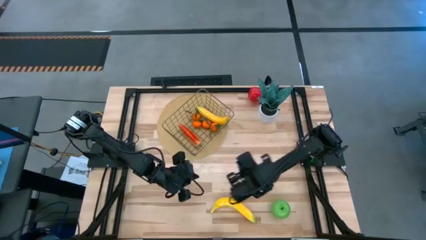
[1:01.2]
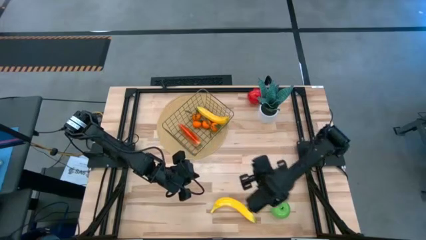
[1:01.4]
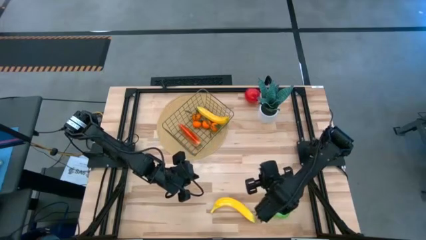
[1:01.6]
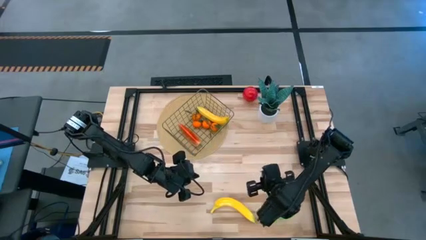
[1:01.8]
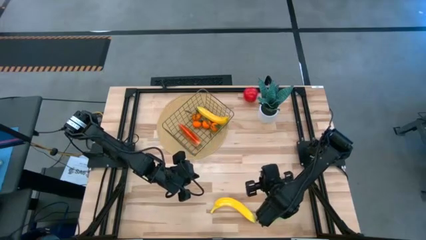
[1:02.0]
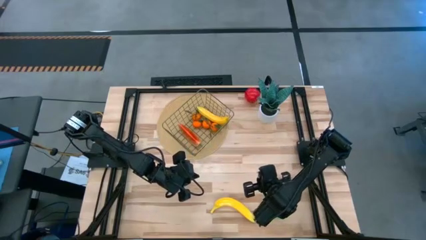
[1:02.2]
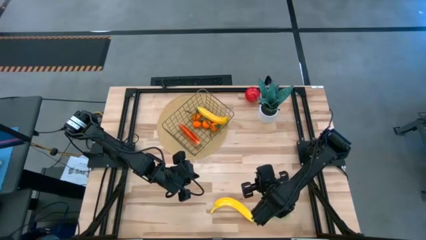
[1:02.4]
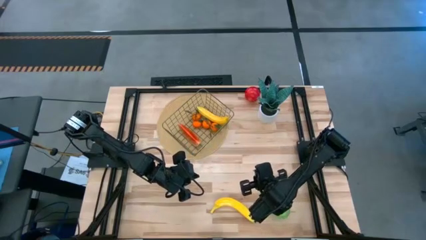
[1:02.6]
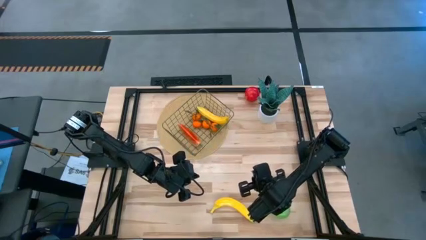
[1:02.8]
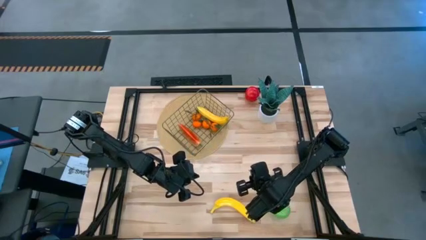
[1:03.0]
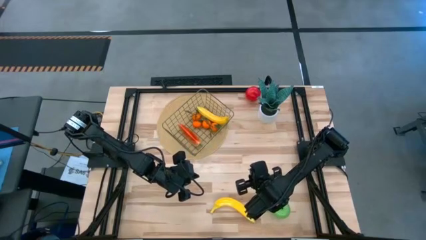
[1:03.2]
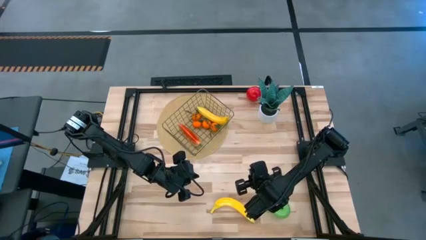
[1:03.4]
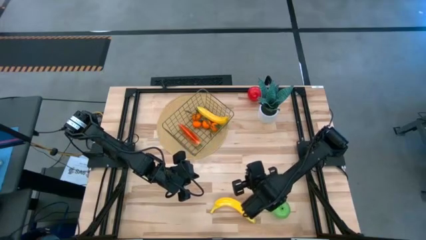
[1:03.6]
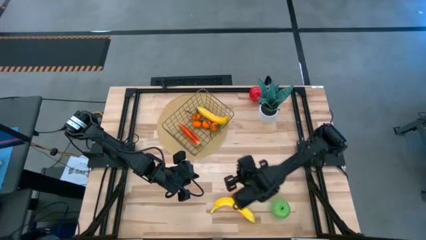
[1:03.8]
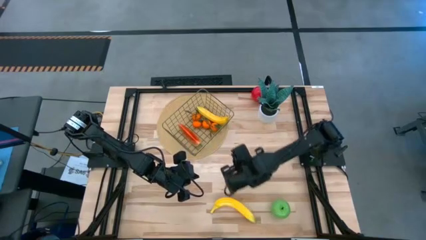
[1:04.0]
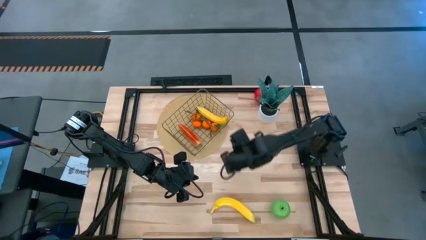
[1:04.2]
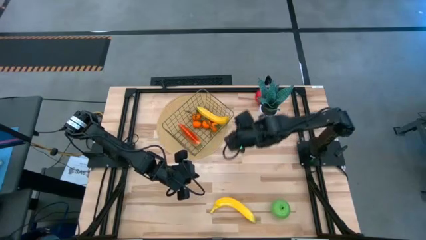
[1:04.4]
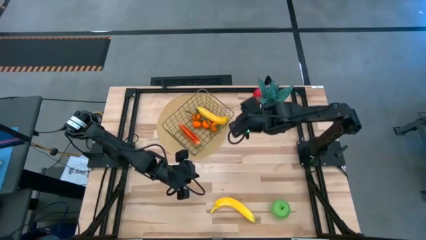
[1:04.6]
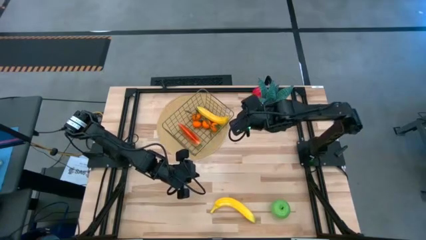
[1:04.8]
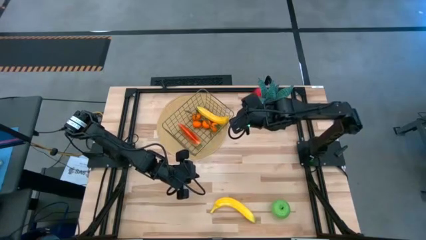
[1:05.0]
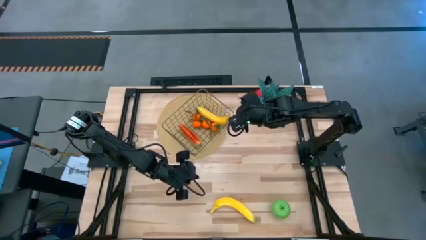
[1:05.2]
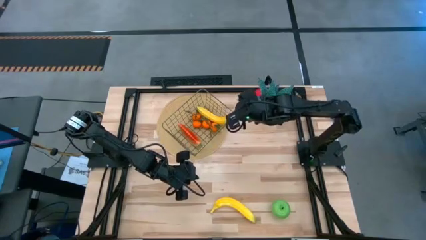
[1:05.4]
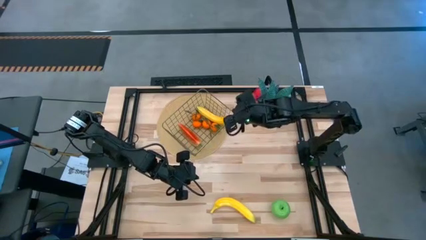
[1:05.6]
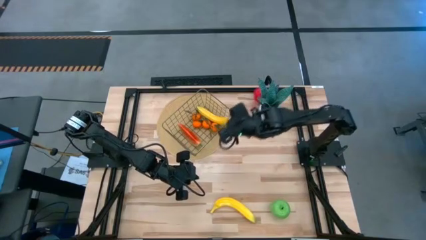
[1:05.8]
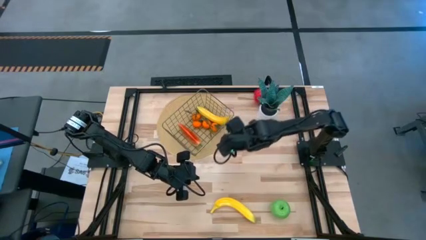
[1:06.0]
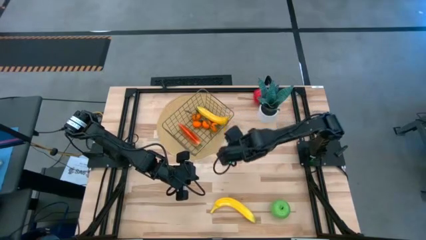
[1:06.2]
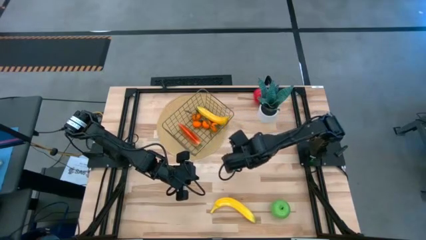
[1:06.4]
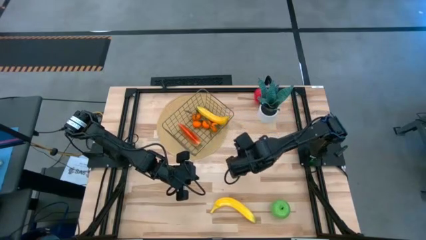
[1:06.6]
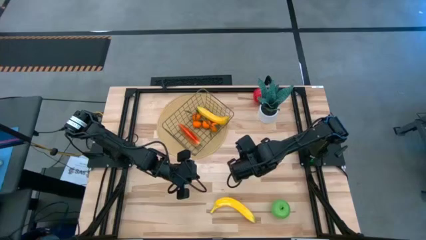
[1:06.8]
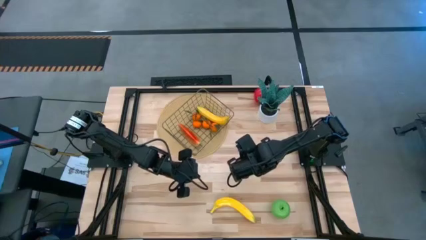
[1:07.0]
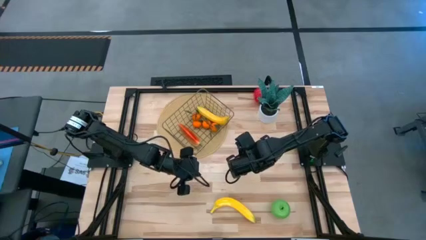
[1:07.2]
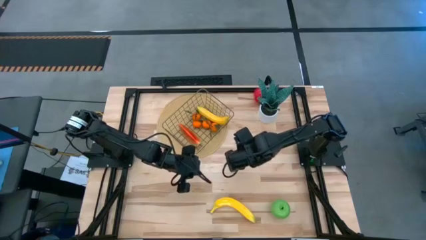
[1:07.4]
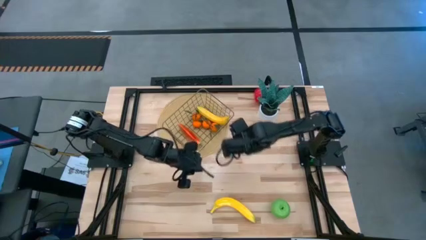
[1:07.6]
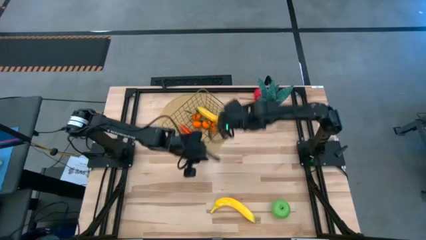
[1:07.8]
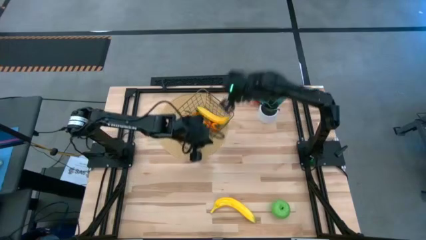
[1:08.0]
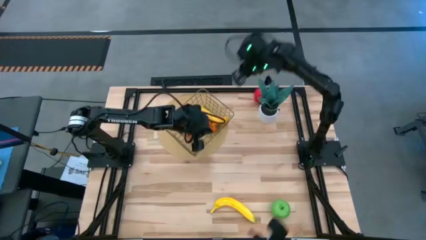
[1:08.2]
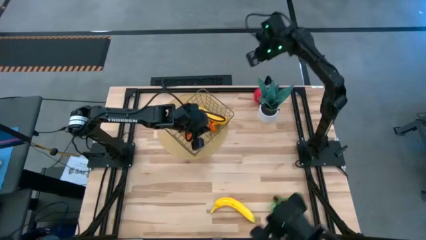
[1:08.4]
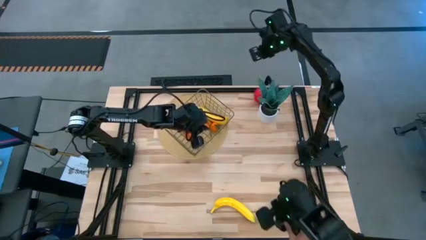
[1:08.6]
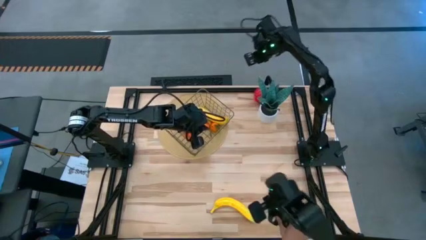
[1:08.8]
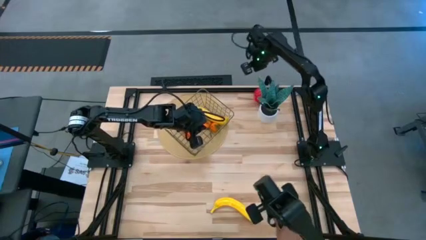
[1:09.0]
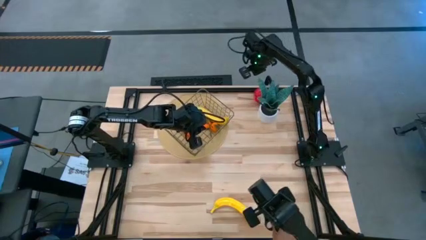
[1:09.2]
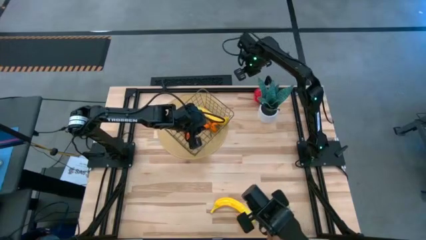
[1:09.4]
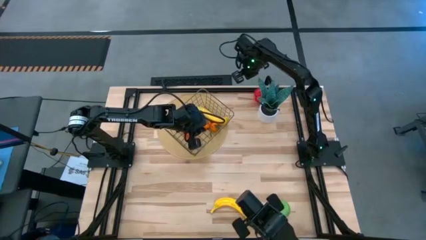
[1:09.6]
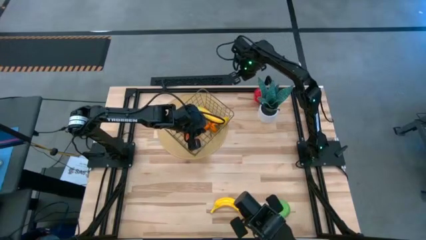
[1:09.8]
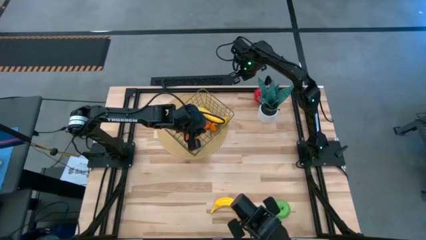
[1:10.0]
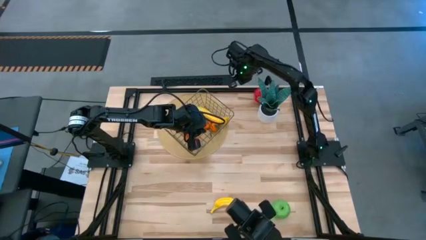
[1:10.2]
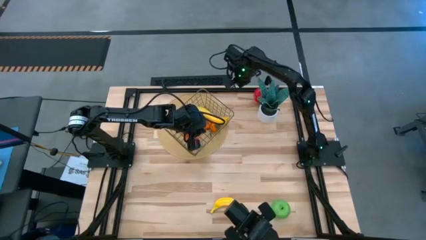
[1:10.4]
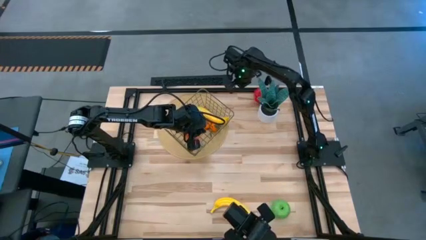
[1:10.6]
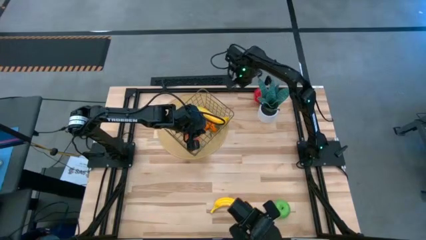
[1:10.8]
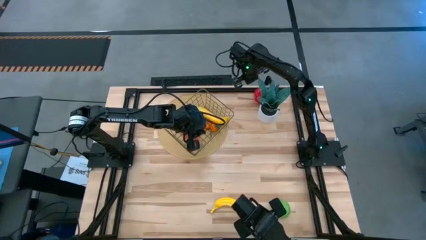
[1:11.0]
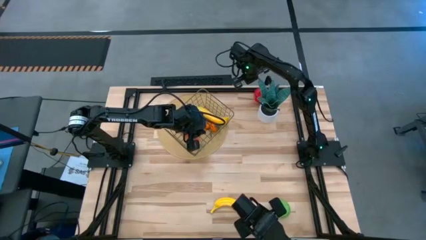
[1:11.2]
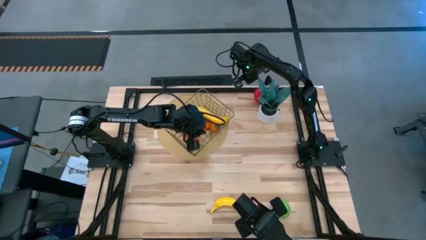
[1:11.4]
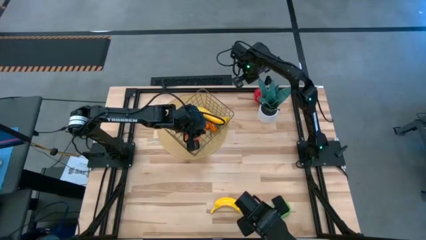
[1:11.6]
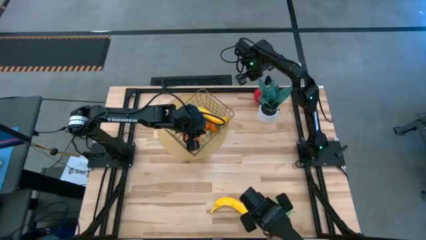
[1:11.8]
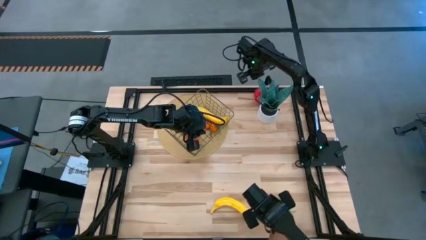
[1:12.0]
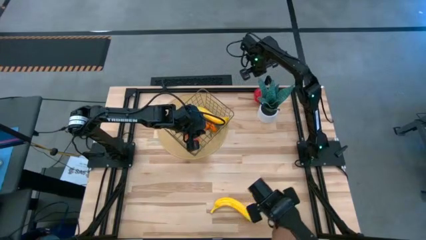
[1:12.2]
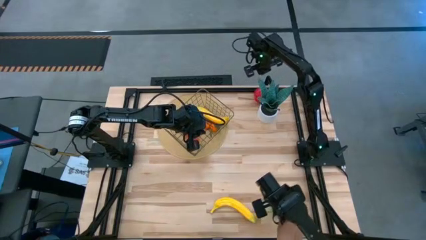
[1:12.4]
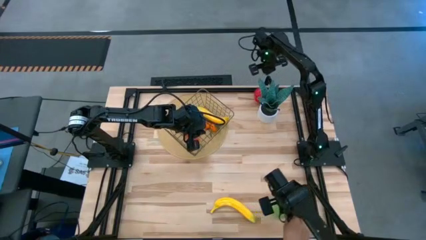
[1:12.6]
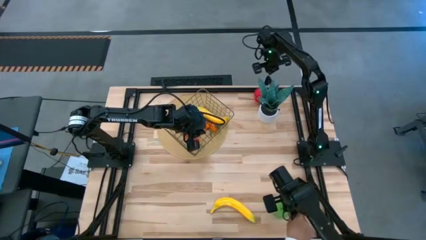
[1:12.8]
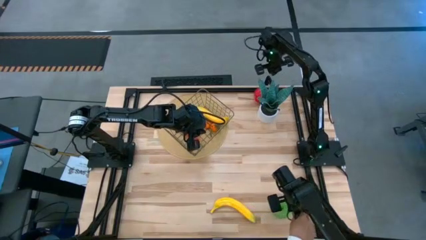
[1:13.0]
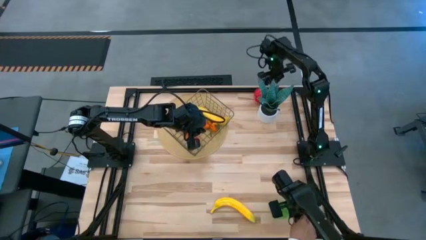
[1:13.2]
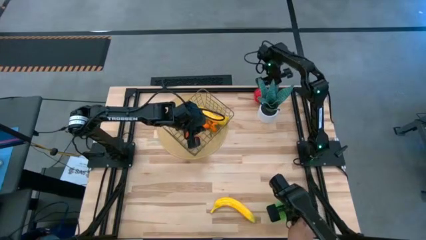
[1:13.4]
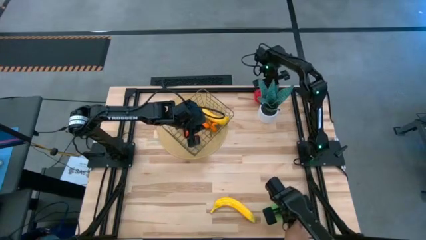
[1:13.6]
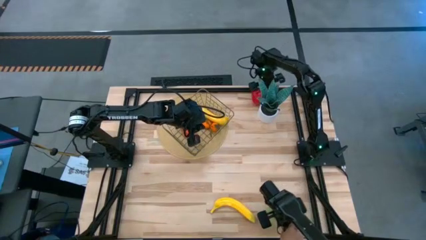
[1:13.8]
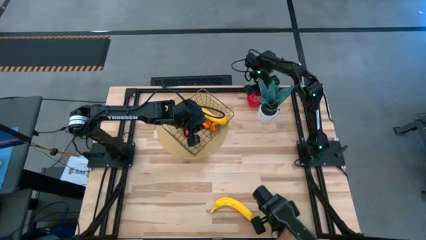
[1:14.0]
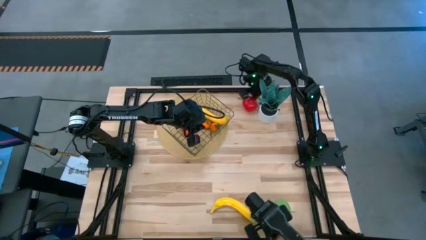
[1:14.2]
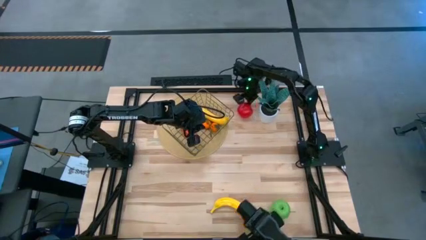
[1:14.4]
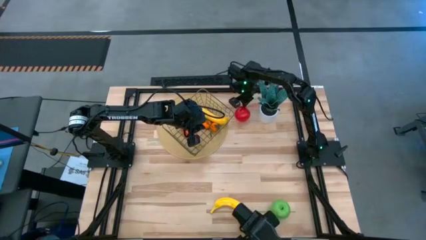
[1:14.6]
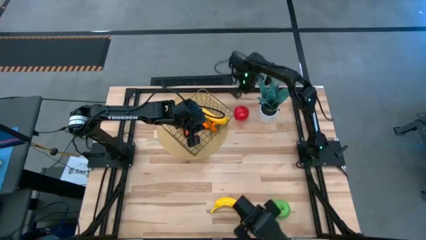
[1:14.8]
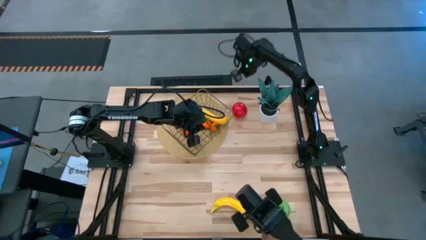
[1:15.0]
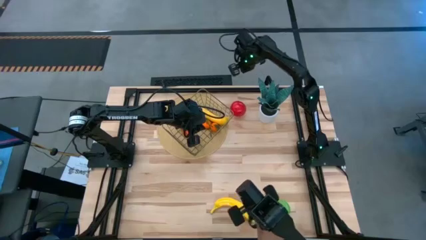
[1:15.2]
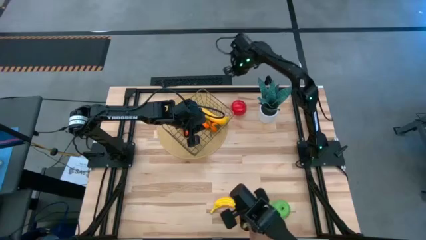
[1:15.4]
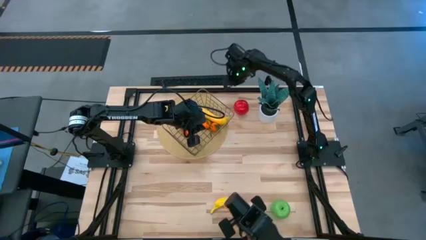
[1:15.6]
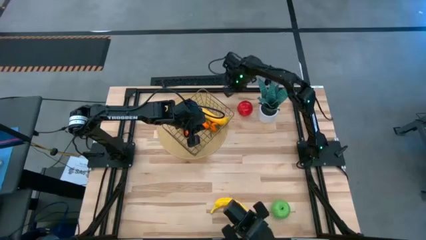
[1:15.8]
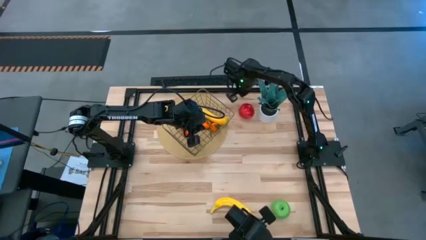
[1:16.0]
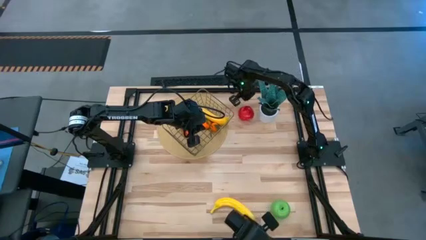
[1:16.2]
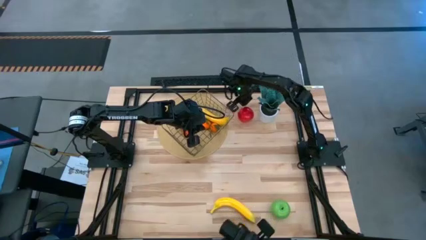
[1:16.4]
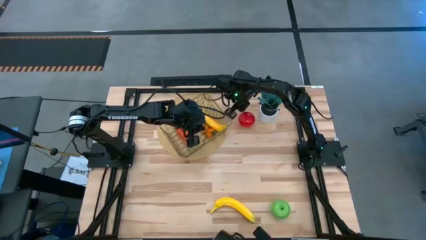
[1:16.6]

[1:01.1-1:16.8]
Task: Build produce basket
Put the red apple into the wire basket
